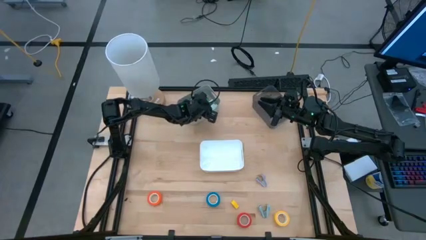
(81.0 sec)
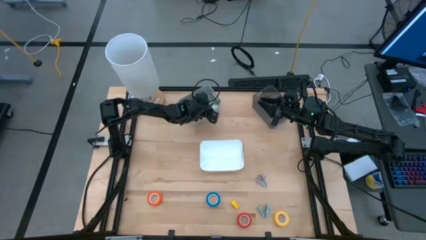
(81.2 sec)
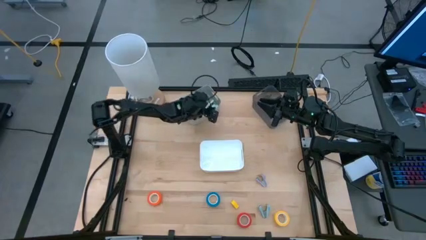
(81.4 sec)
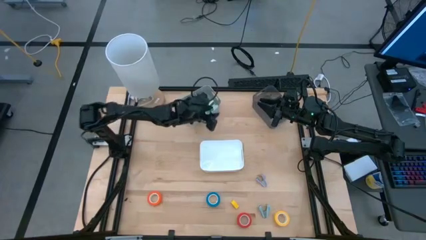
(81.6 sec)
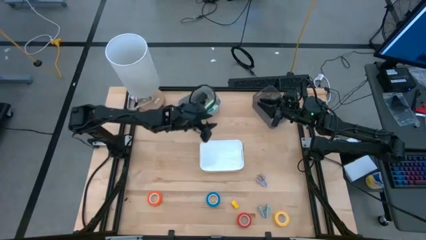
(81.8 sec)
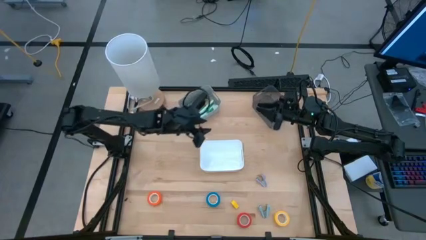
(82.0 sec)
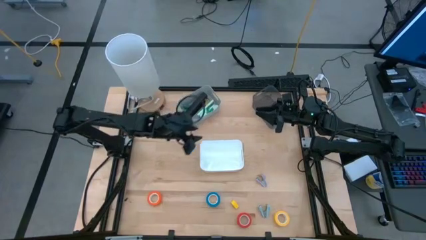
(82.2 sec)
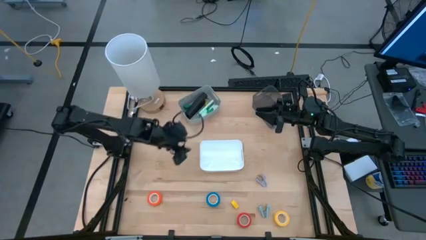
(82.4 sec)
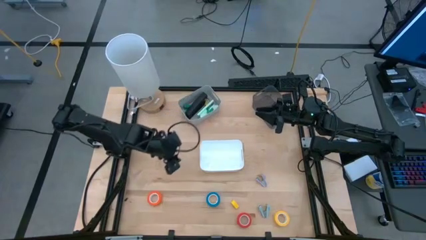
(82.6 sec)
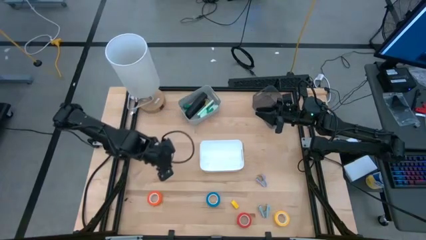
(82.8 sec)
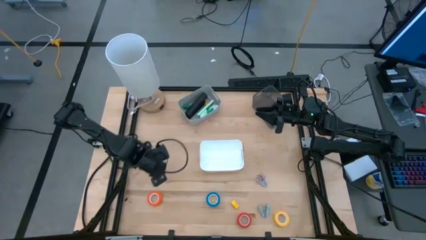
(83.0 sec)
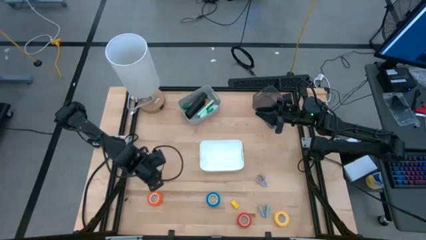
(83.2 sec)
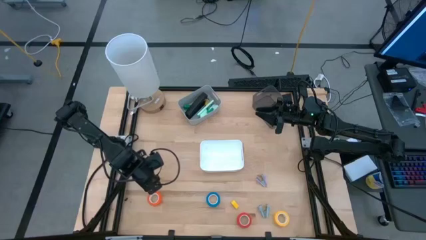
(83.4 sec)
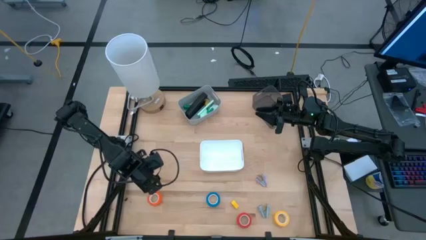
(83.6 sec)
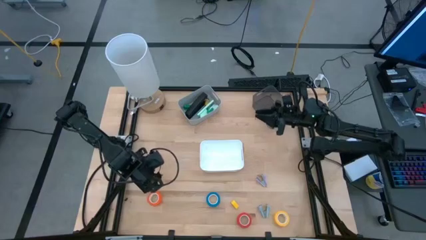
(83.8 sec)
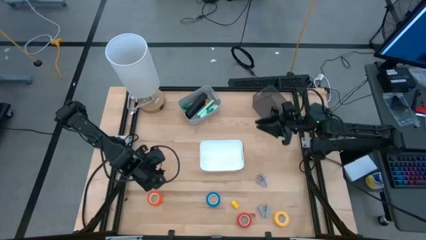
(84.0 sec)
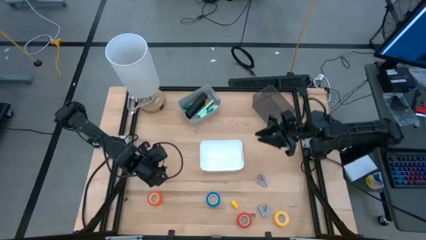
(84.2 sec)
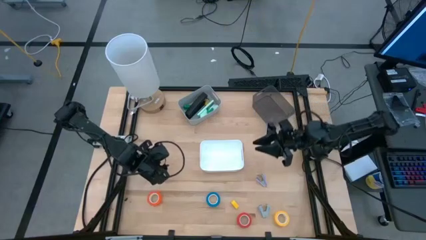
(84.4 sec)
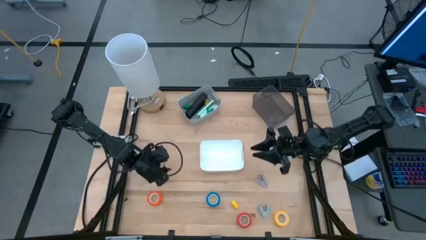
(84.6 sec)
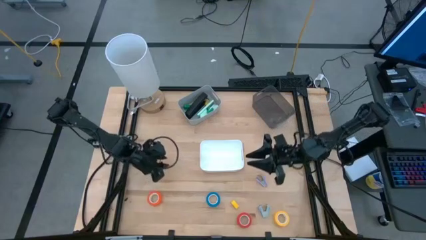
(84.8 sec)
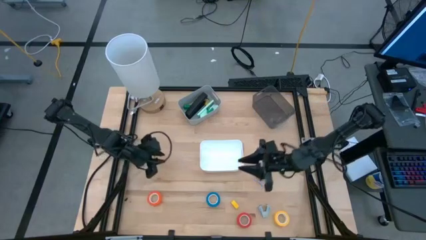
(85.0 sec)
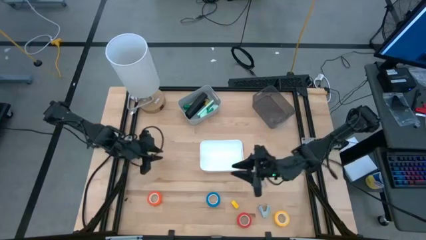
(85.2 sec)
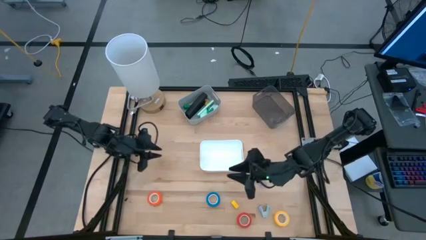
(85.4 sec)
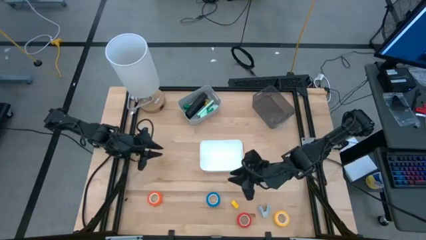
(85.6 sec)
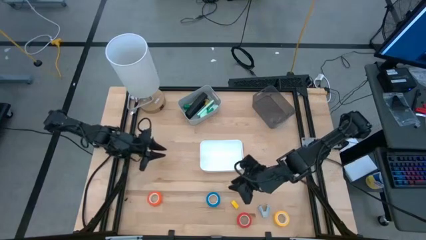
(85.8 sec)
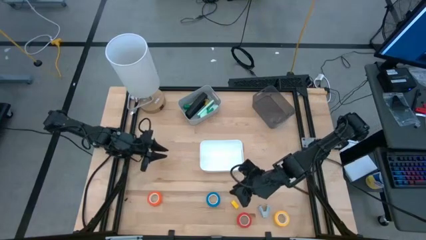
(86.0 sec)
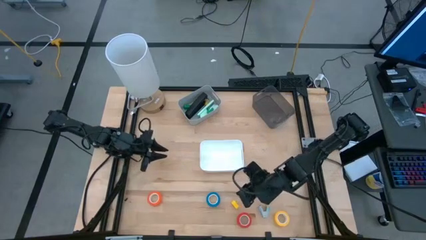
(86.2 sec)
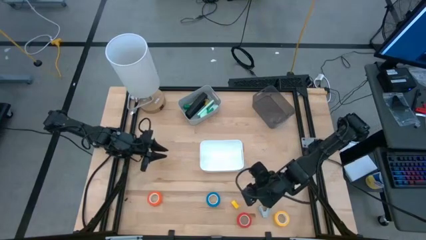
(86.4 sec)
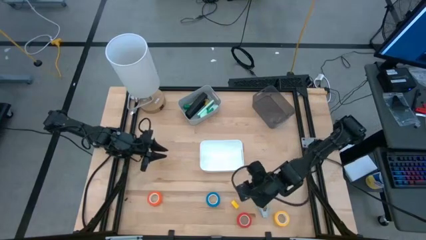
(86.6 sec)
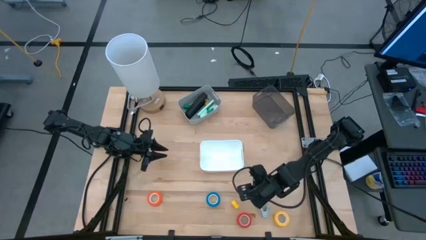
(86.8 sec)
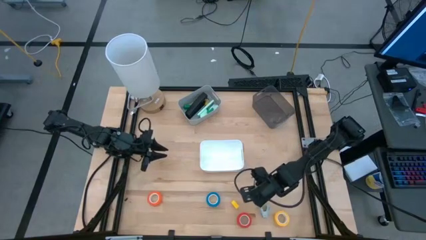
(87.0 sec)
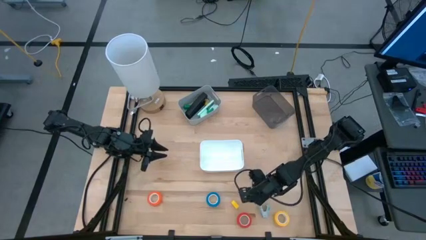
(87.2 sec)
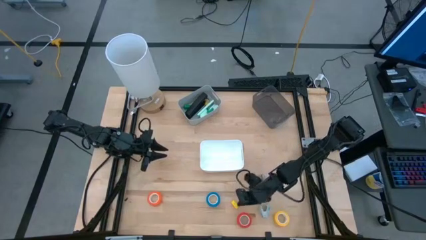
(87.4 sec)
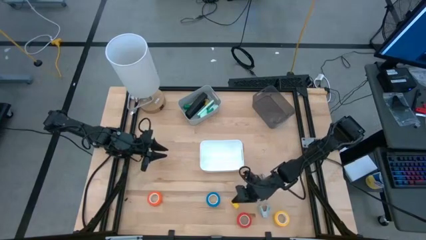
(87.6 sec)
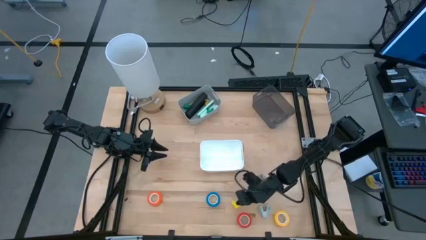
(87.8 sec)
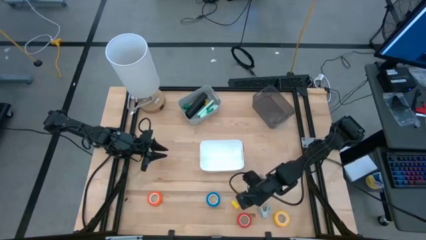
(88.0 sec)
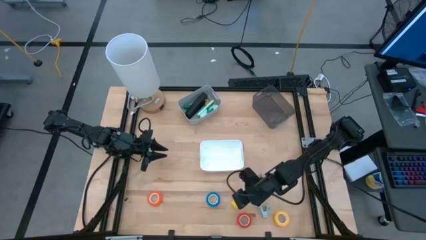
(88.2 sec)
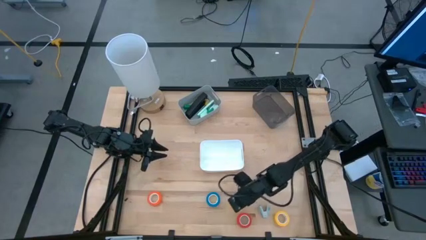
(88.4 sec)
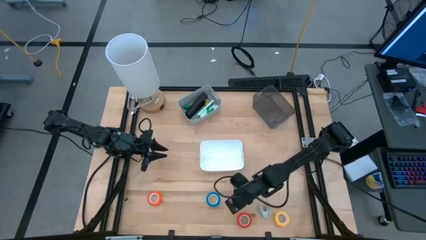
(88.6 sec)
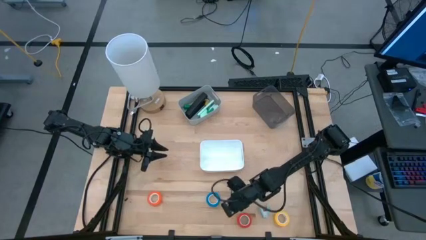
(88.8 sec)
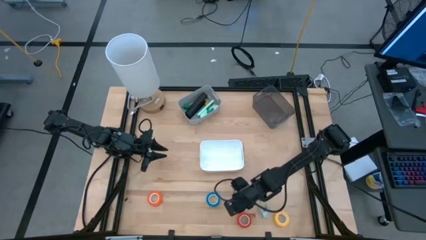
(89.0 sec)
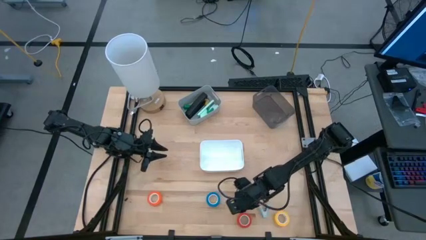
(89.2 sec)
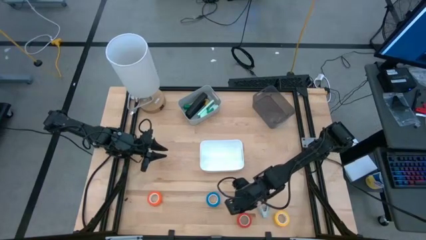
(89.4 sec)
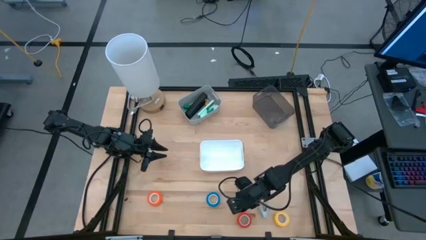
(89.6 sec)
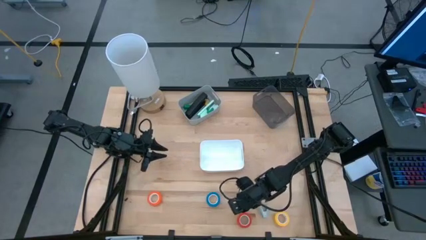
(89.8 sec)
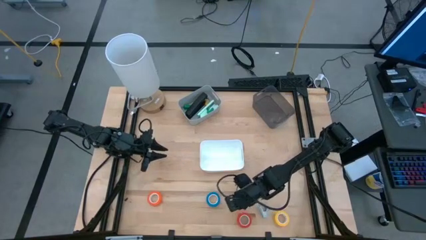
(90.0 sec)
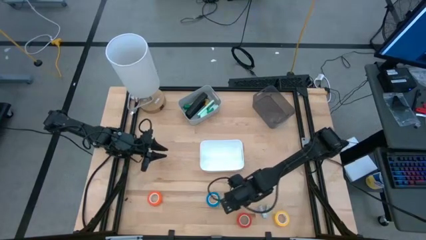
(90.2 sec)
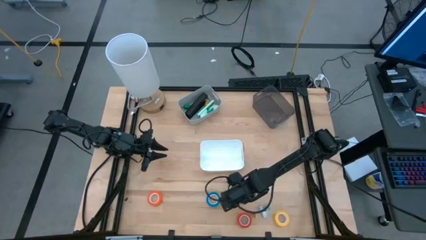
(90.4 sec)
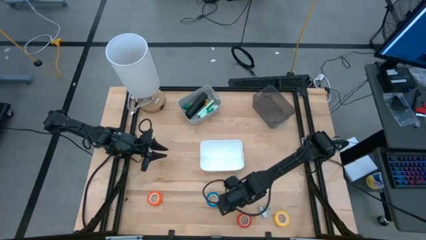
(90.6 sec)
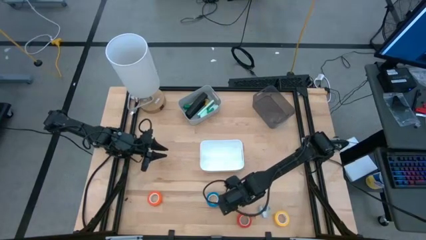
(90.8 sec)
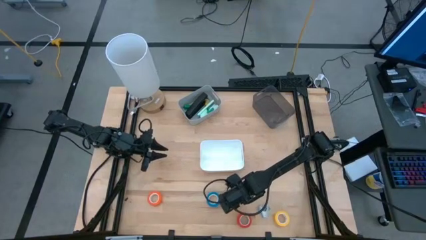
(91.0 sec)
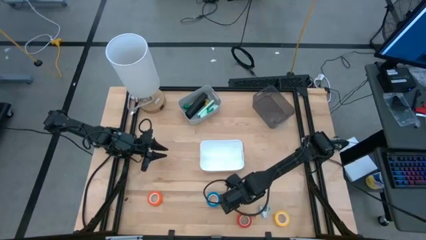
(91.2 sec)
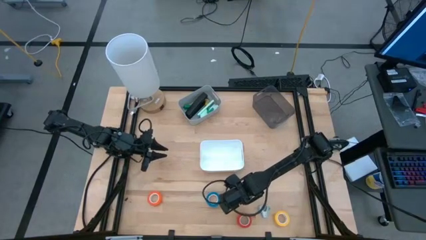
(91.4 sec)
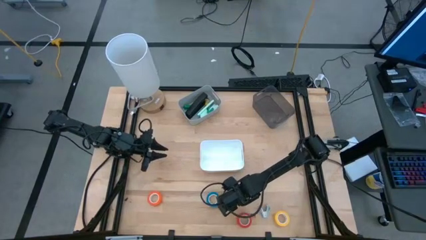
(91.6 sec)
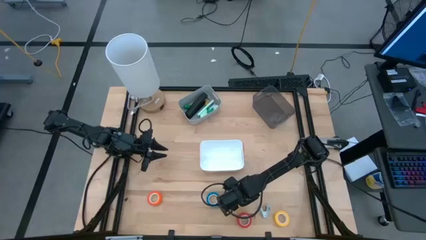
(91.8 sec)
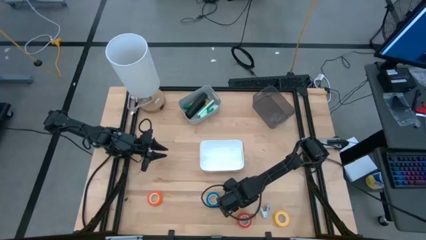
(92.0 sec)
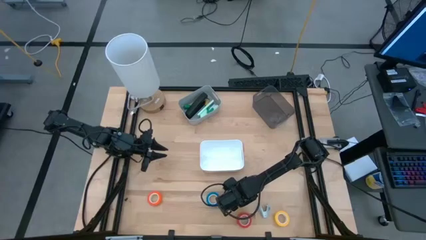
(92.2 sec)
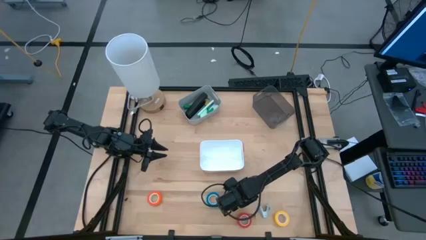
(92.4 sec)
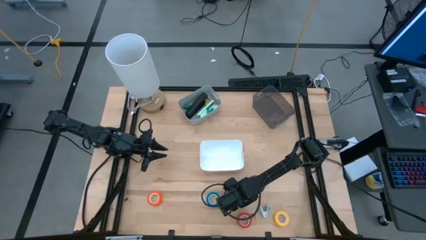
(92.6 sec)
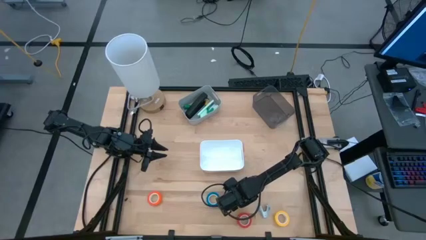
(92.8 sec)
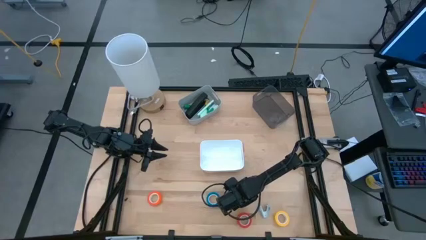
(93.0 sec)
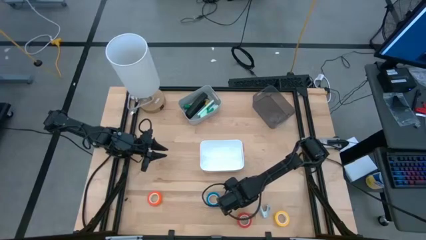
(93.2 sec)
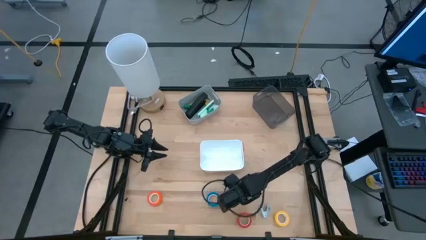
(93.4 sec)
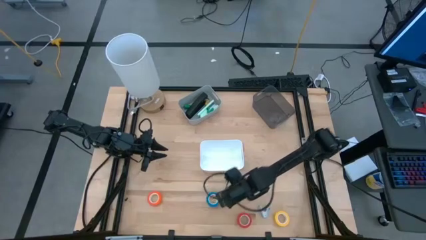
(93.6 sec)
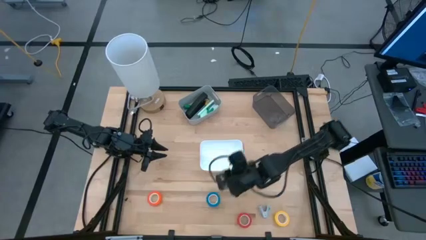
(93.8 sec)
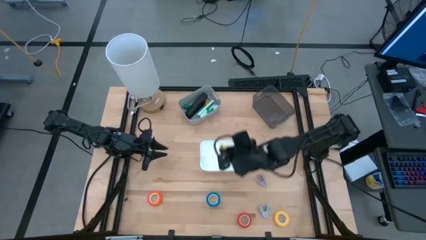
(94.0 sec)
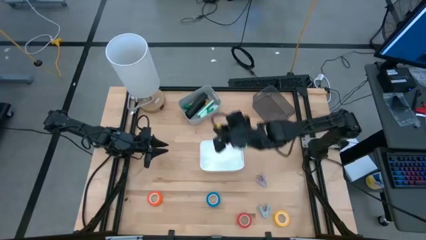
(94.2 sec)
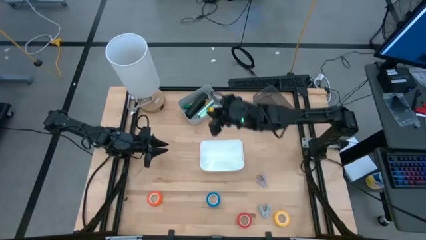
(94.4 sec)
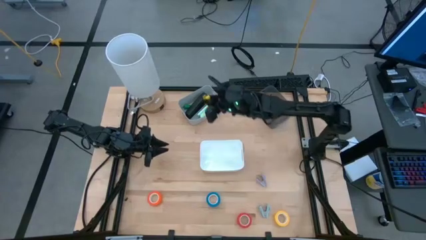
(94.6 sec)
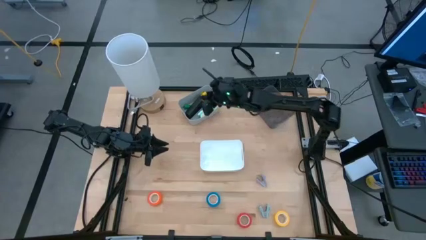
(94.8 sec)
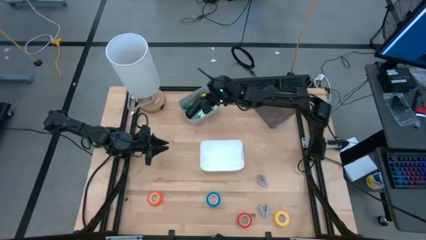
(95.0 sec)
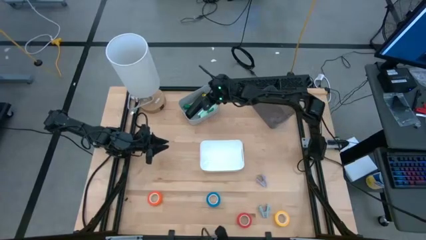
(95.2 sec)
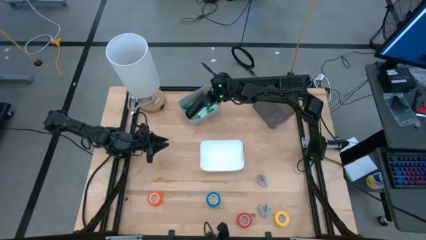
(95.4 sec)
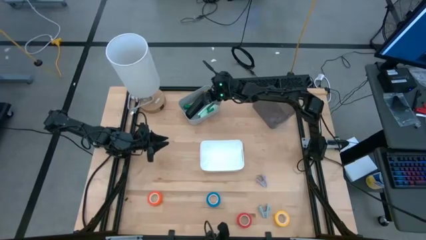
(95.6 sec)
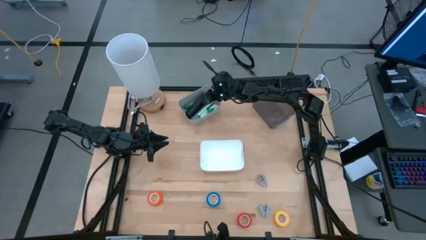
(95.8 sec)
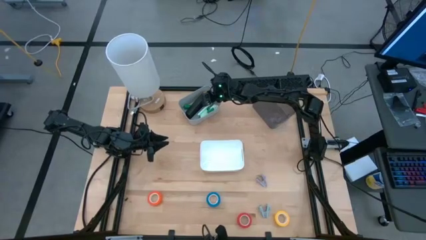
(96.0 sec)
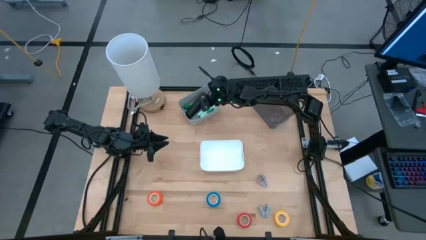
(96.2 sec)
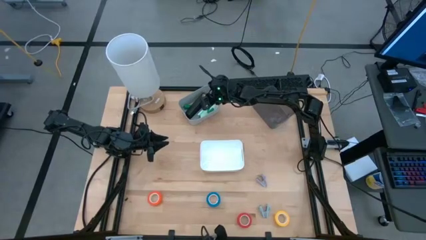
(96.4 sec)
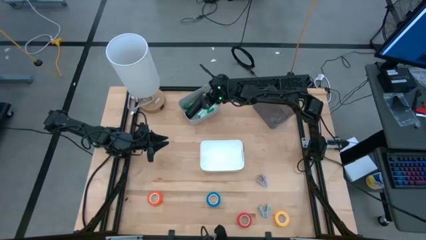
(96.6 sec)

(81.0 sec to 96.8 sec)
Task: Pick and place Stapler, Stapler remover, tape
Put the yellow stapler into the gray bin
